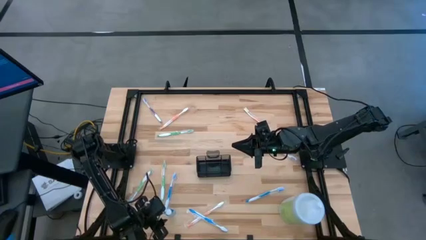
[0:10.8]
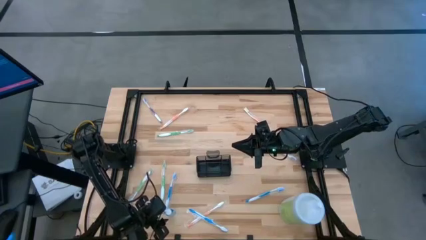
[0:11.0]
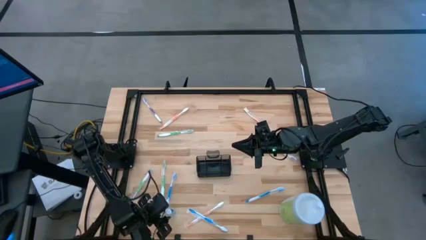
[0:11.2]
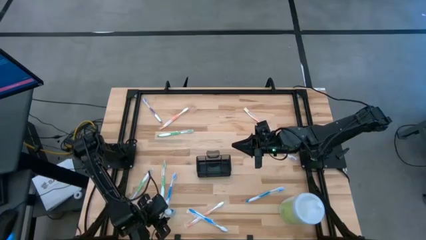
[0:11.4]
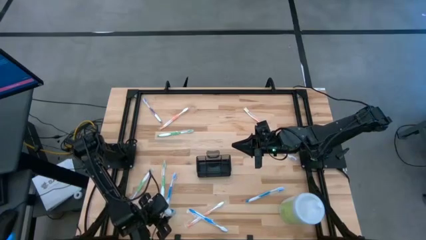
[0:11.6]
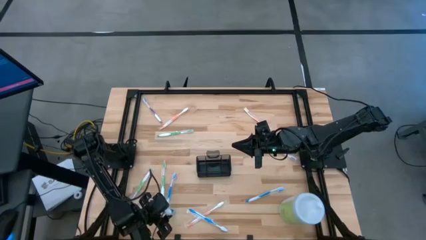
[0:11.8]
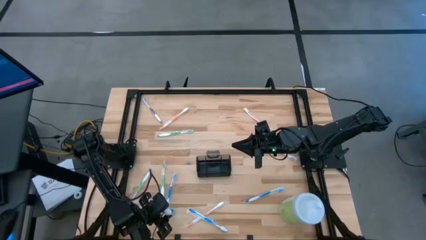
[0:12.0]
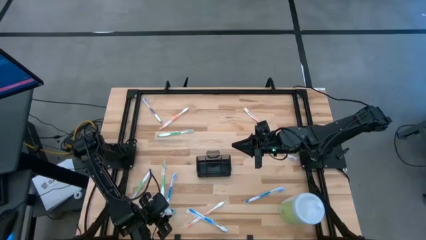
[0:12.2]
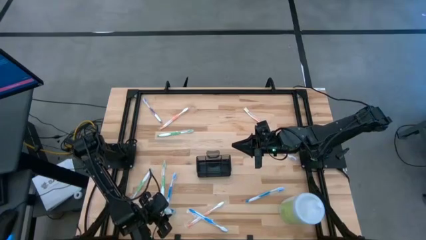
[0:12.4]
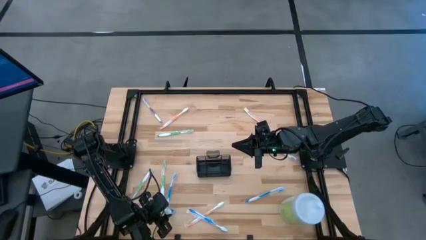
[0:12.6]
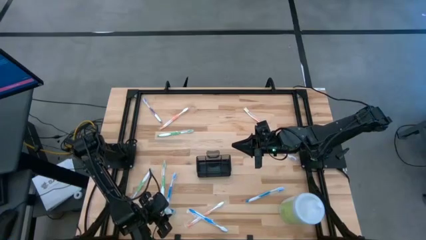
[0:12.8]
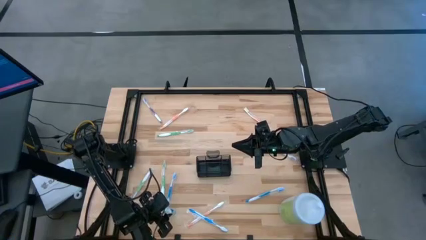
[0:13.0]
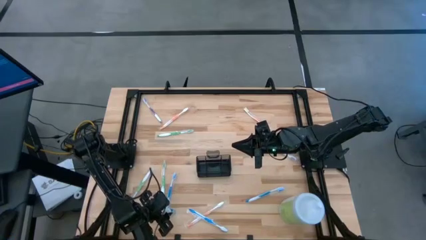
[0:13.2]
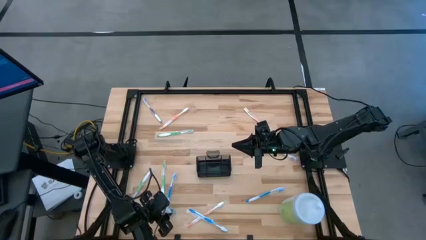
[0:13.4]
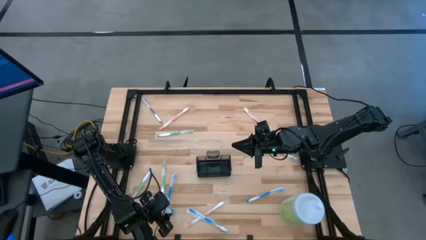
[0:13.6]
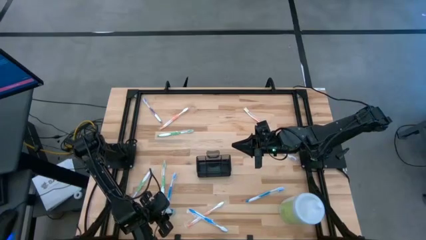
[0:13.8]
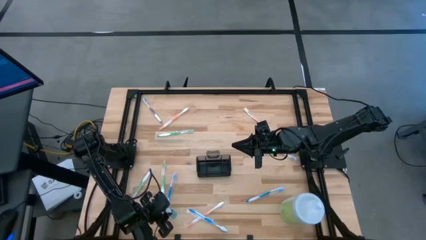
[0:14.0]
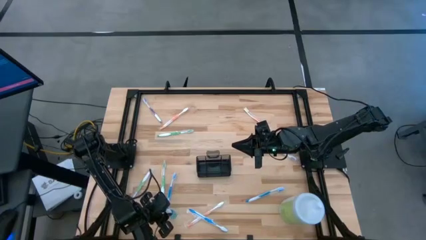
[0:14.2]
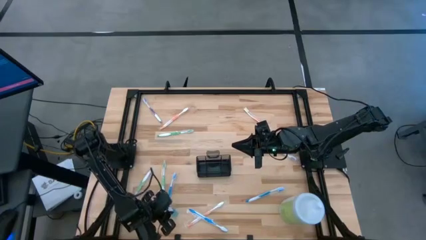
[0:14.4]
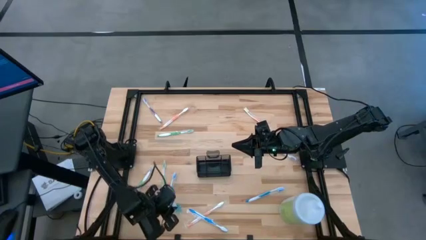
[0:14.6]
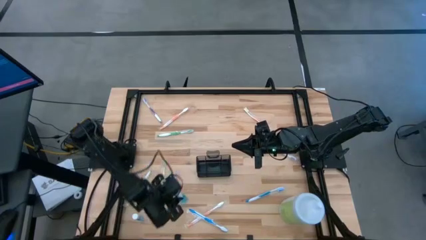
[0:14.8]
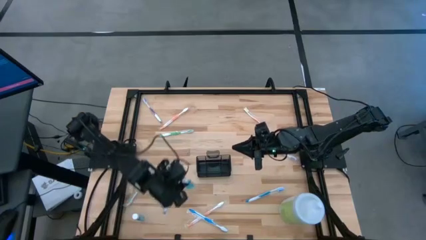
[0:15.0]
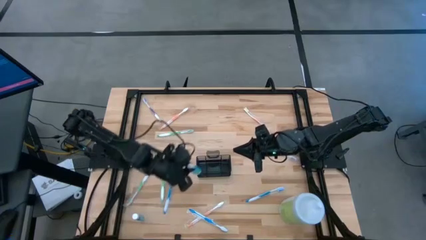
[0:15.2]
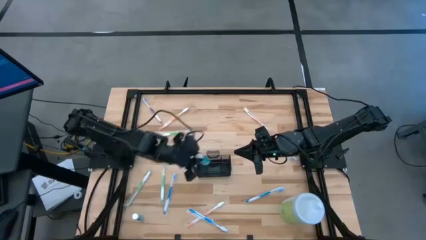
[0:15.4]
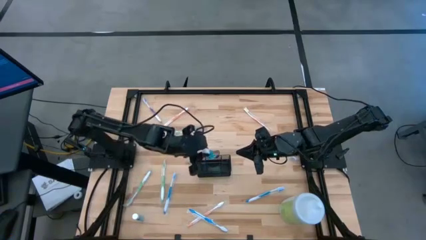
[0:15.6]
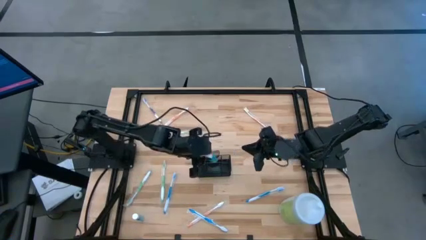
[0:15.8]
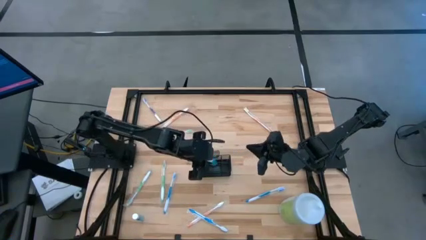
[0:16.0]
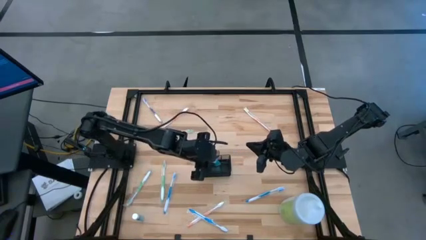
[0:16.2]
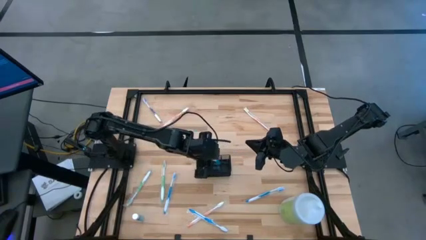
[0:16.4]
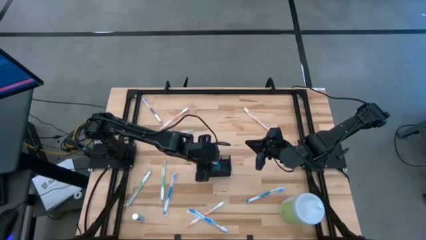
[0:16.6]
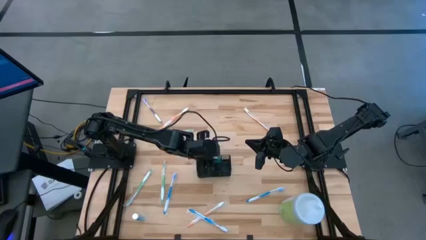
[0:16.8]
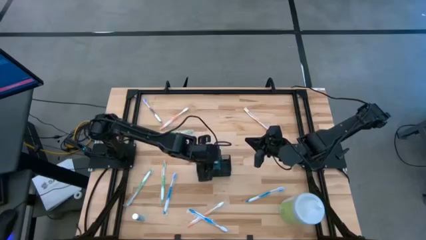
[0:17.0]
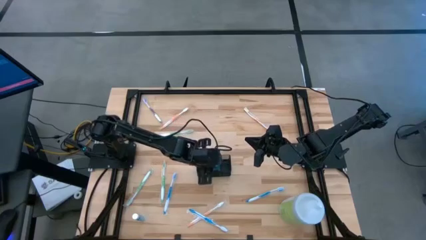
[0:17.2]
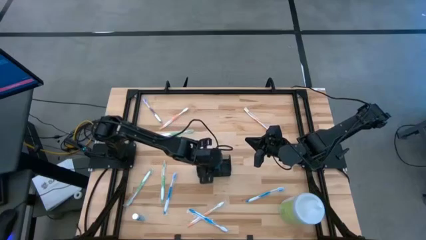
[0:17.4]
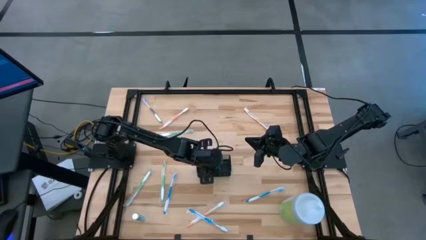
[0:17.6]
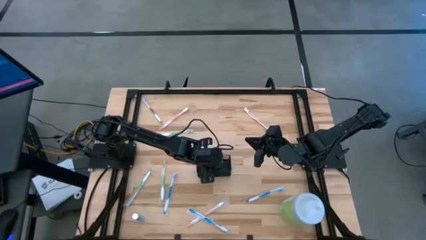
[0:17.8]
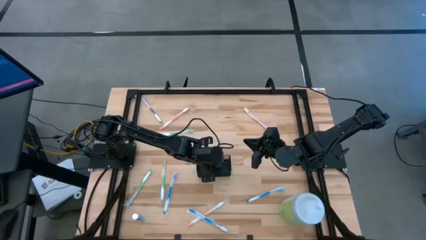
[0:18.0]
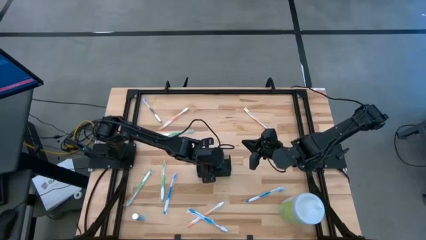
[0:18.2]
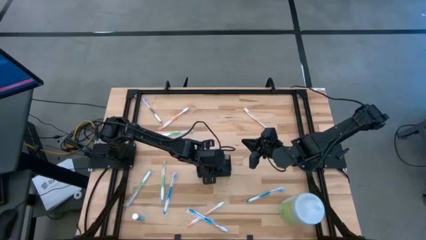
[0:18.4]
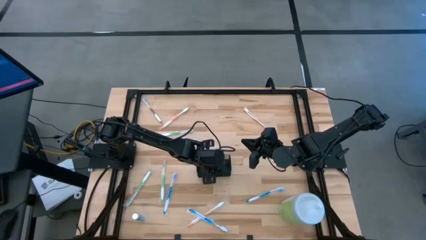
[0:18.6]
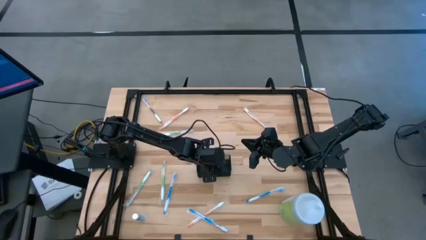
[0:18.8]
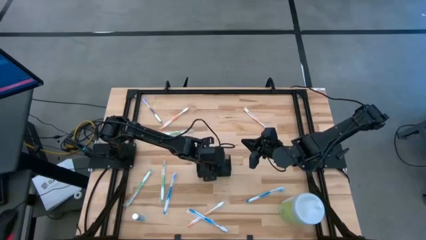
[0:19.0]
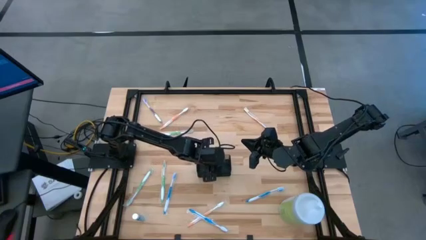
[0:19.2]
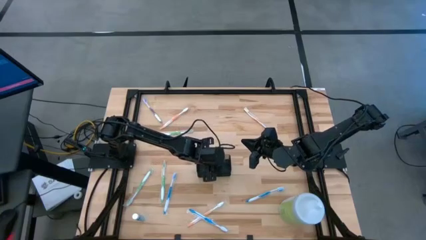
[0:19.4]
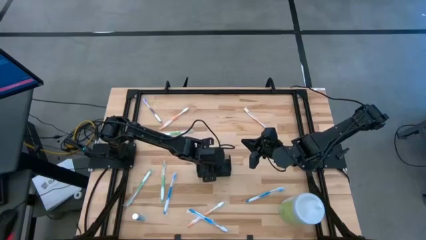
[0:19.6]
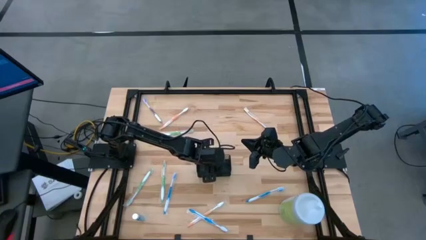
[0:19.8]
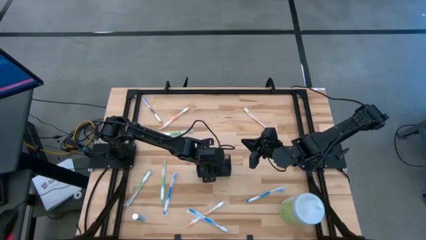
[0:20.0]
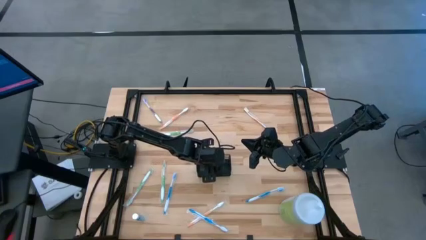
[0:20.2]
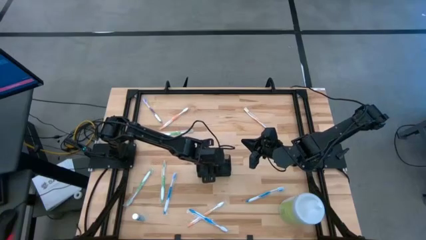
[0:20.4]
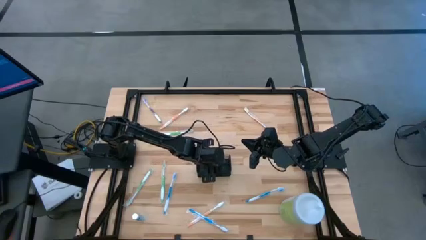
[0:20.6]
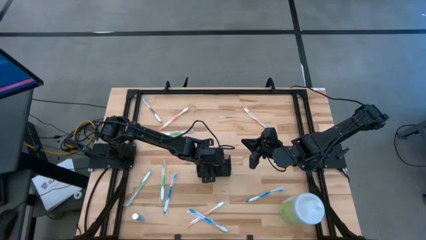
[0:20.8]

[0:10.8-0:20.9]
Task: Pick & Place toothbrushing station
Put the right mouthwash into the middle section of the mesh organizer
